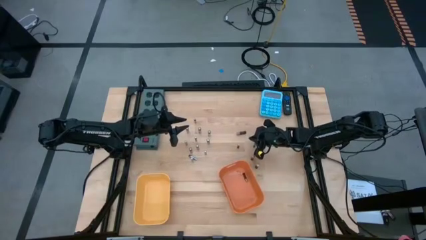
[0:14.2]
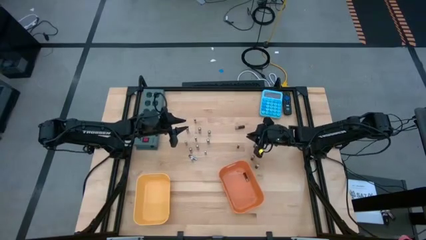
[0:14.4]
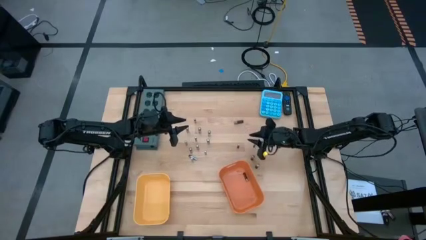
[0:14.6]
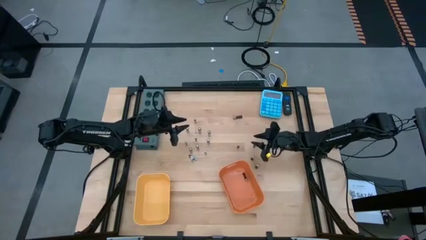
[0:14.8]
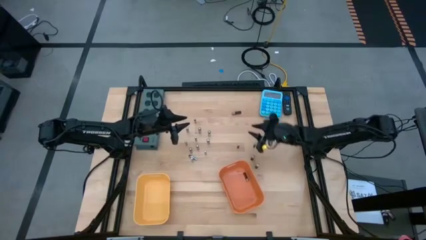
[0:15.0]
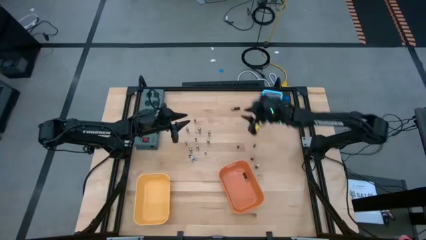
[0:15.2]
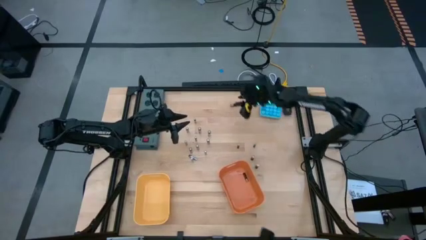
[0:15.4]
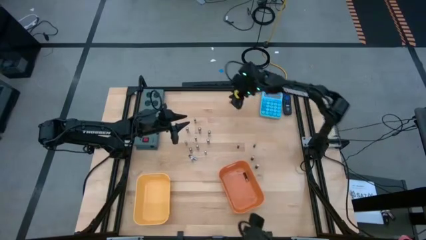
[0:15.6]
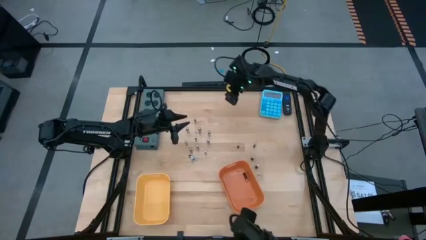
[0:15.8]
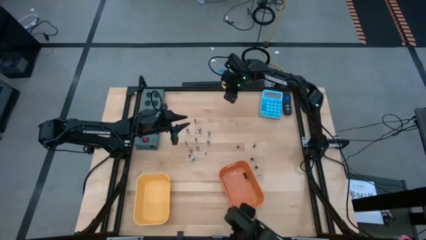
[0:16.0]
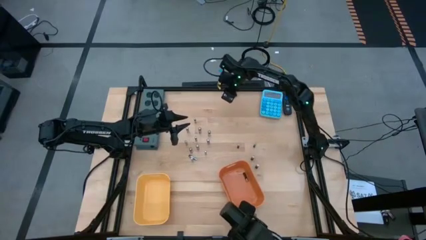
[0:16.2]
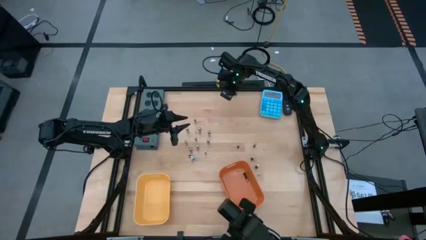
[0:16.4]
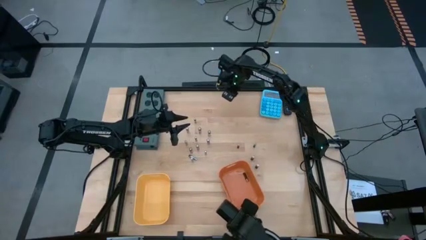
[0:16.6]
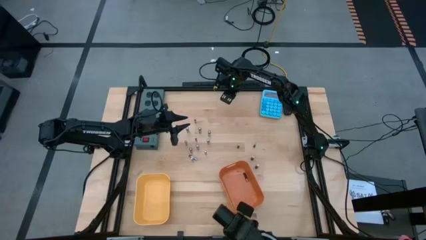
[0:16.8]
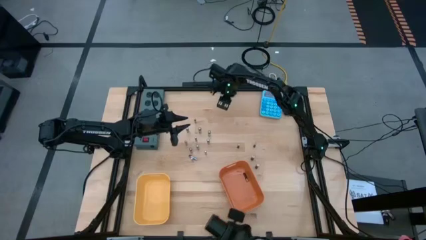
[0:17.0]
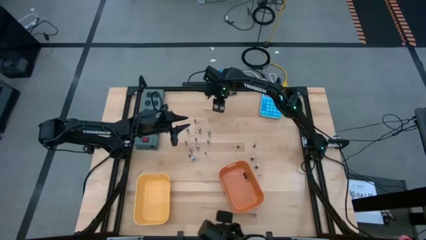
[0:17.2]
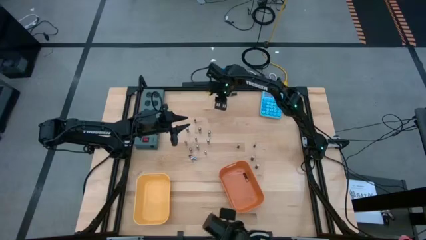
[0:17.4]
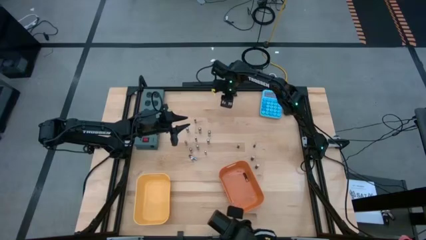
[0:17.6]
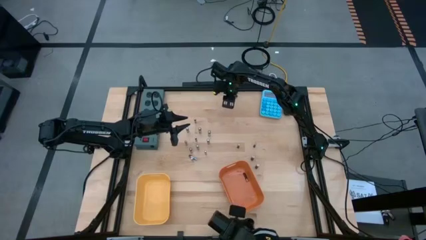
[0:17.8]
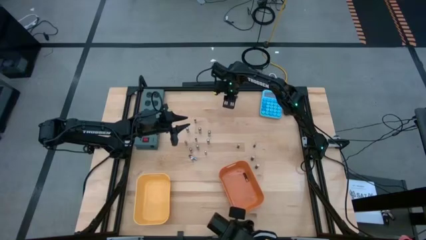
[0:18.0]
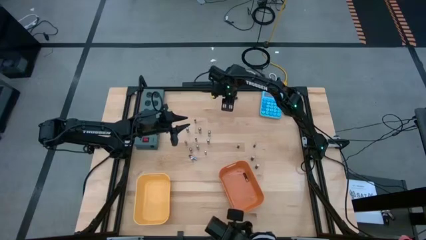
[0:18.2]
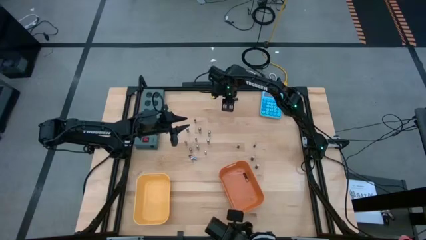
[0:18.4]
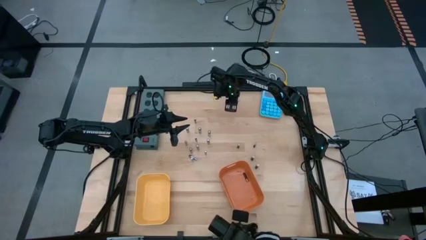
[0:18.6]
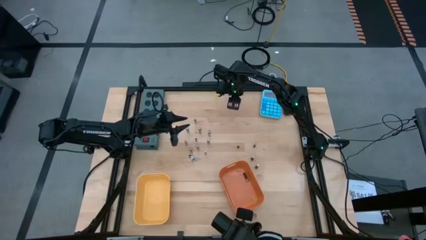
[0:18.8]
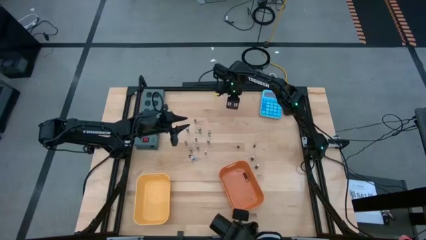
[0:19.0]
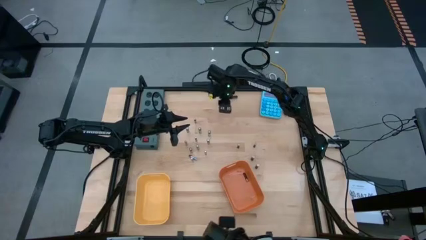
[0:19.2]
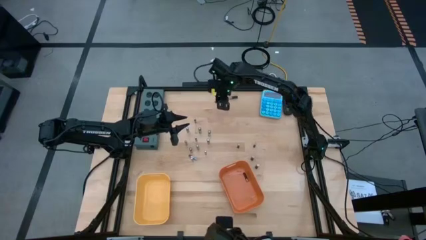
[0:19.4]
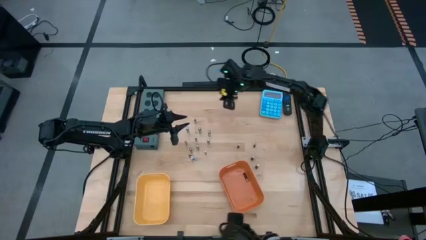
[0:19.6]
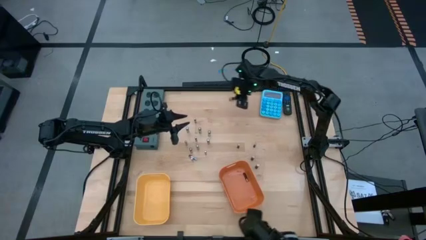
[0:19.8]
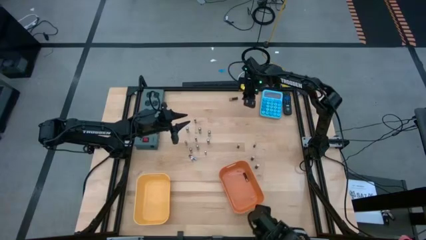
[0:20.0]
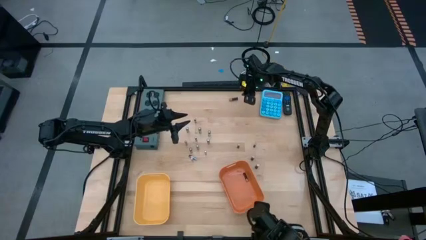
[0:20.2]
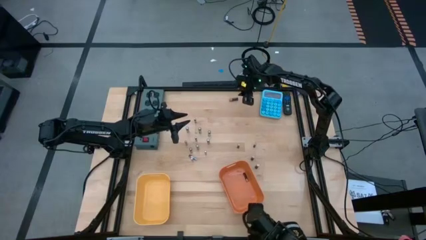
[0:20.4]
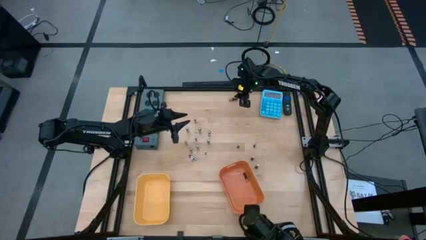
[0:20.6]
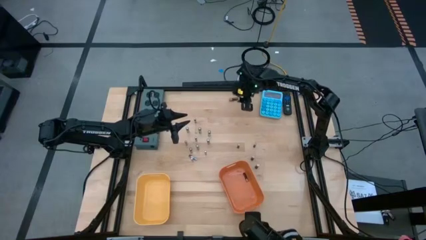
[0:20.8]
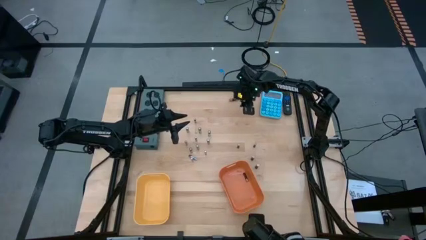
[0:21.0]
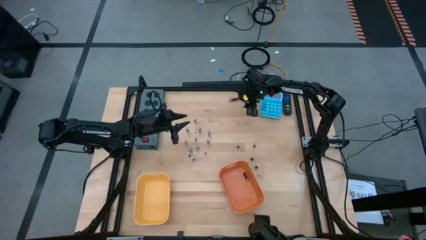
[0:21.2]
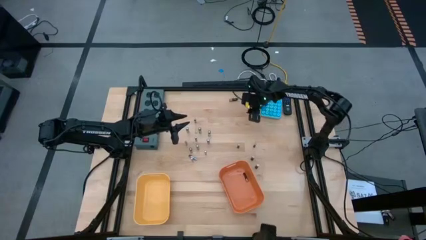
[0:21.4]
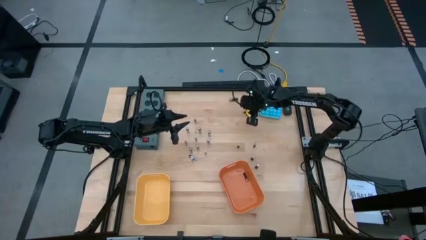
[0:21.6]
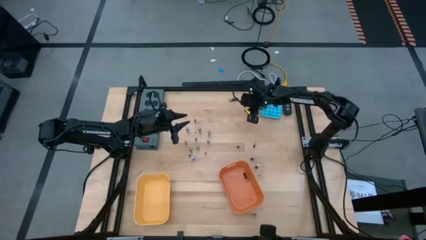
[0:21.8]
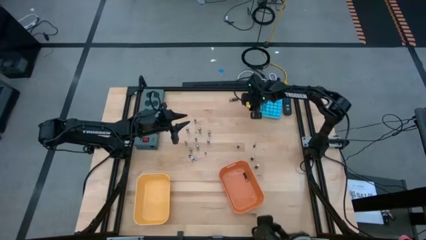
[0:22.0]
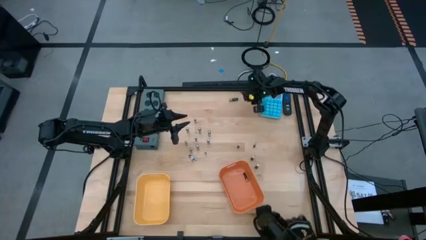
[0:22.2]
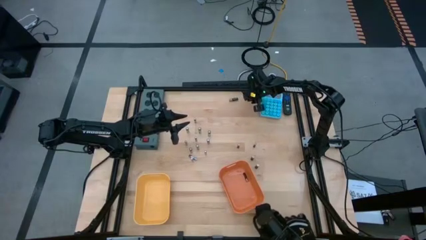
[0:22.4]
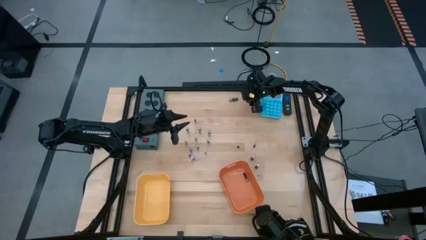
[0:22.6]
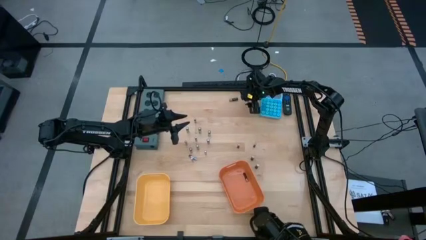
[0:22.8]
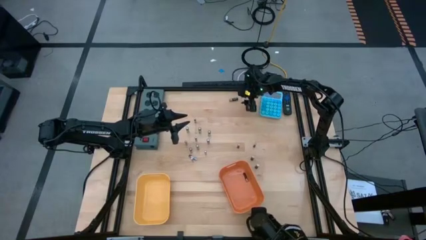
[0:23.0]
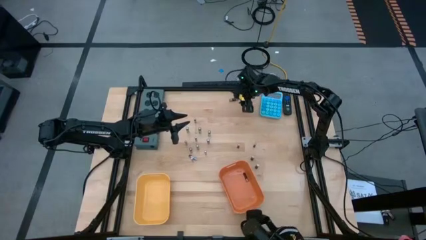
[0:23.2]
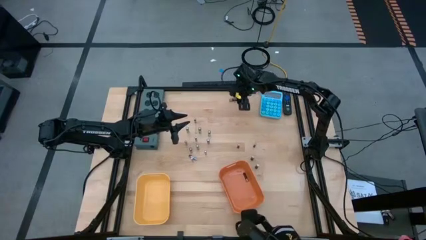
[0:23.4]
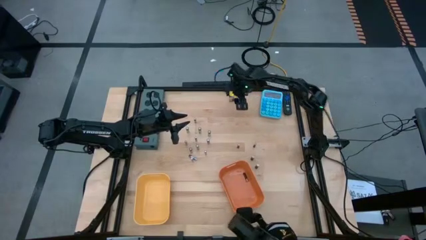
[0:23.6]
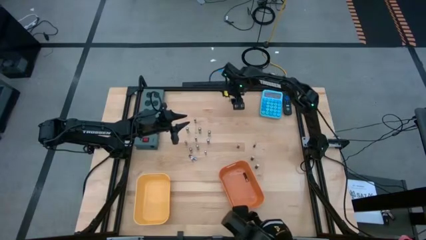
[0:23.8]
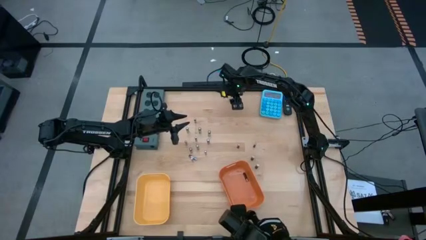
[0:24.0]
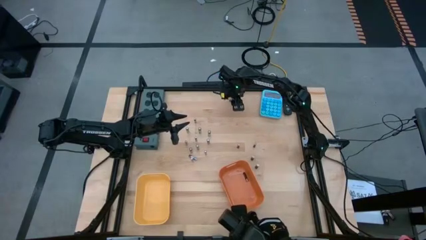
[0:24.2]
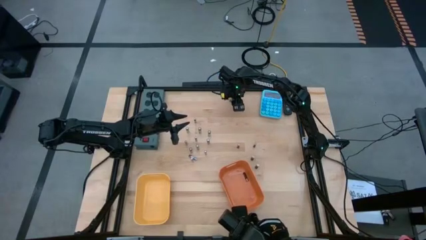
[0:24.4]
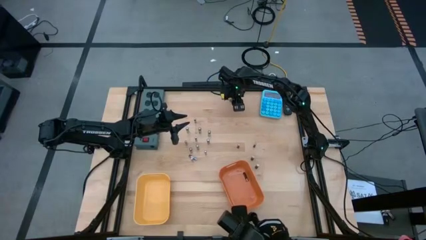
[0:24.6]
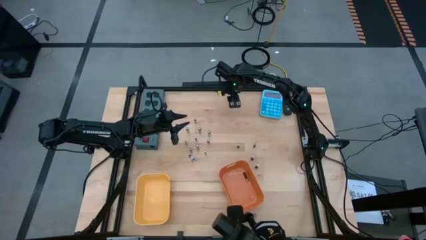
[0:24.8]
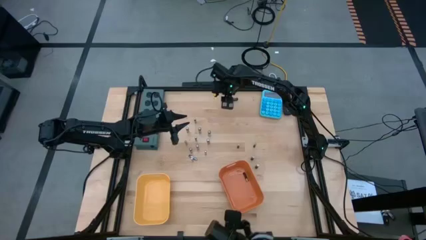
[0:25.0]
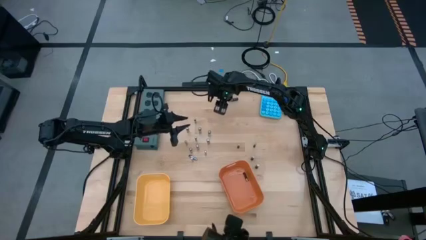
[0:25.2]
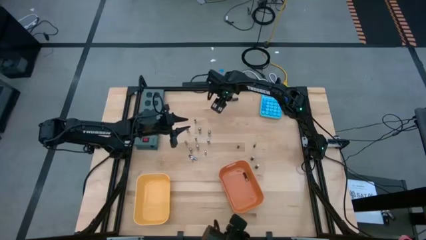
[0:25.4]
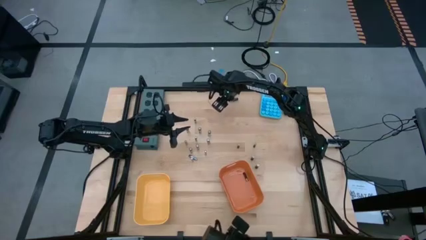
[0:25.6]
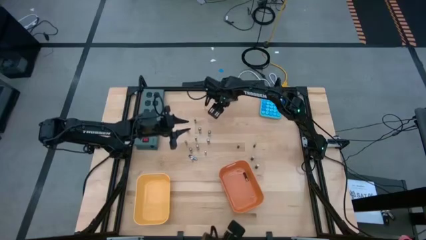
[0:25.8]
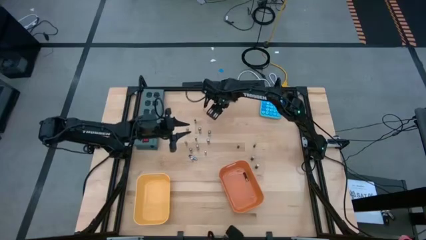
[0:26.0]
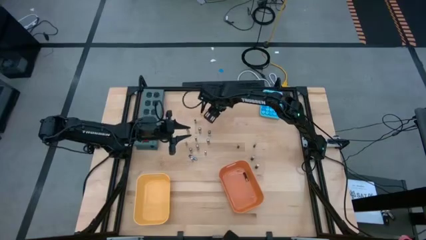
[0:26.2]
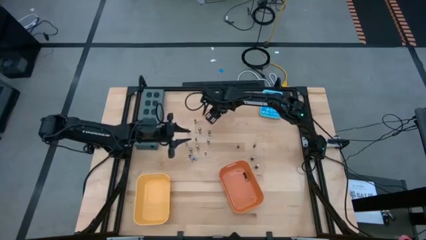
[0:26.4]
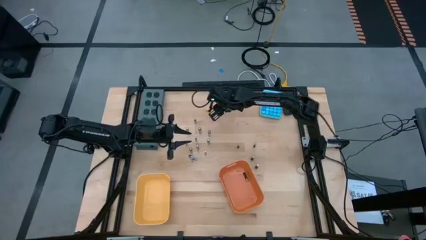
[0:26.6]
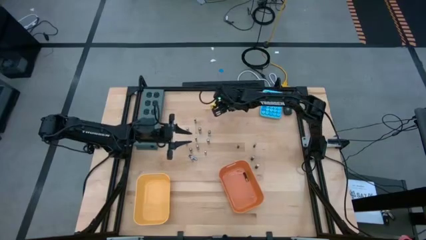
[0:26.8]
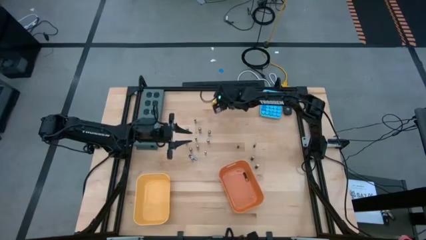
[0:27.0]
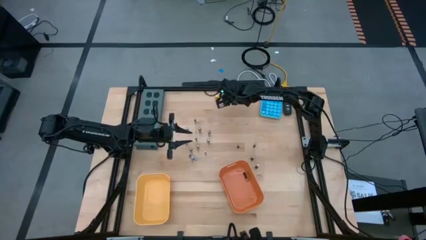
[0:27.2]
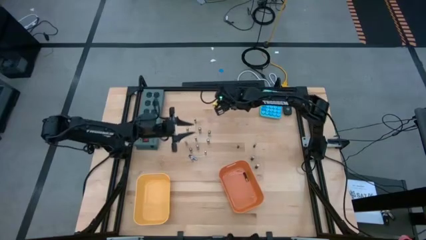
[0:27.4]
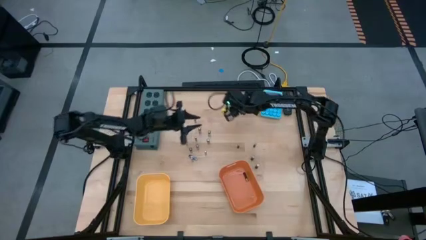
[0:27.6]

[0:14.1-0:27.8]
Task: Sort batteries
Put the brown battery into the orange bin
